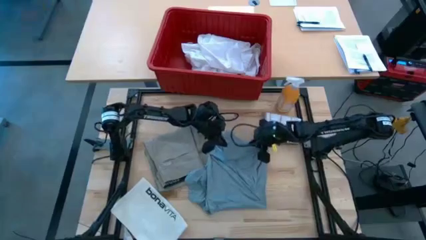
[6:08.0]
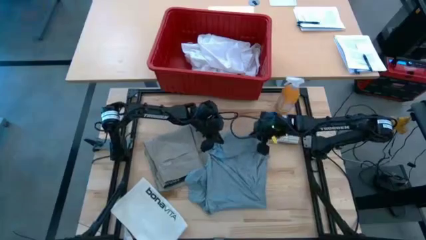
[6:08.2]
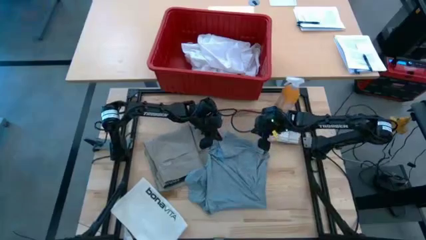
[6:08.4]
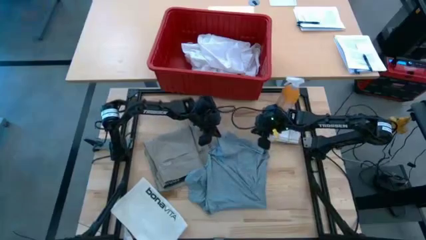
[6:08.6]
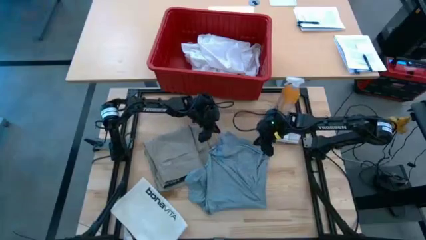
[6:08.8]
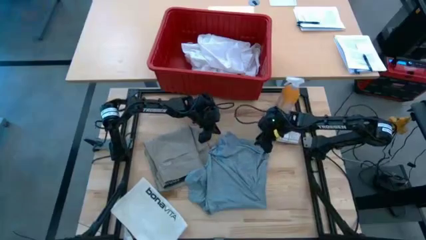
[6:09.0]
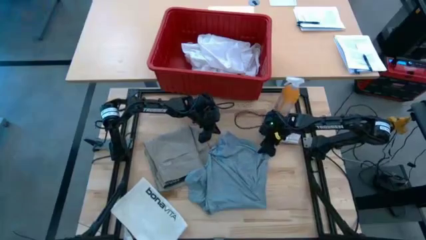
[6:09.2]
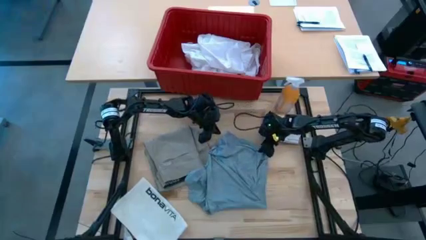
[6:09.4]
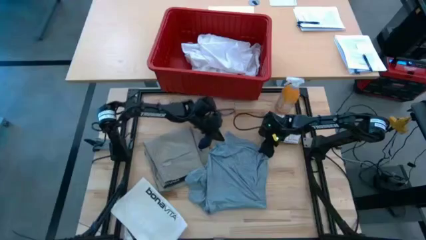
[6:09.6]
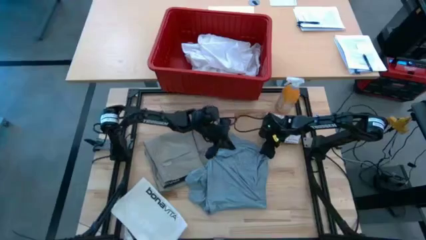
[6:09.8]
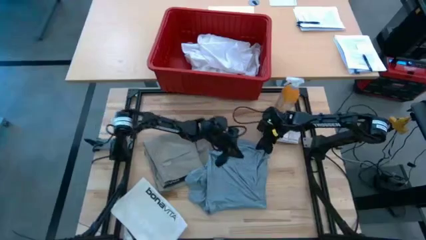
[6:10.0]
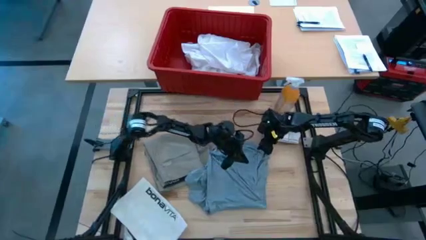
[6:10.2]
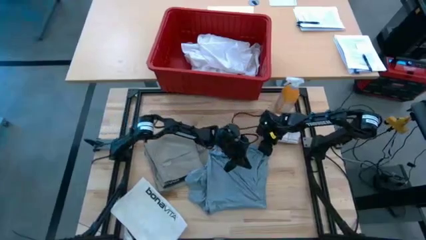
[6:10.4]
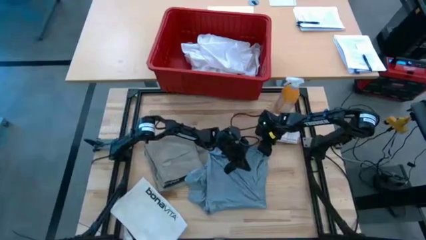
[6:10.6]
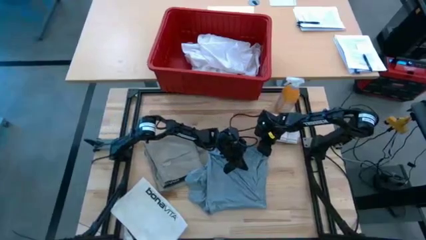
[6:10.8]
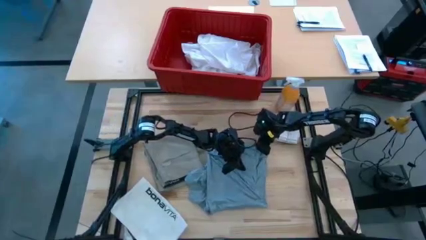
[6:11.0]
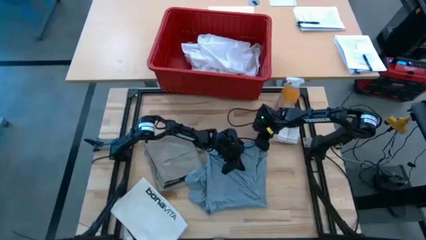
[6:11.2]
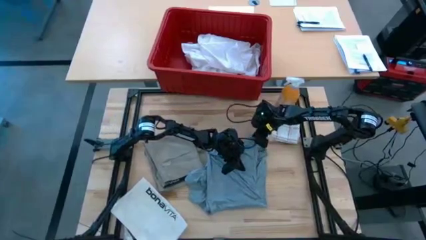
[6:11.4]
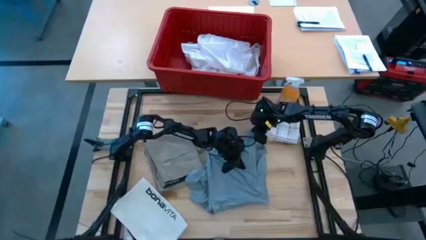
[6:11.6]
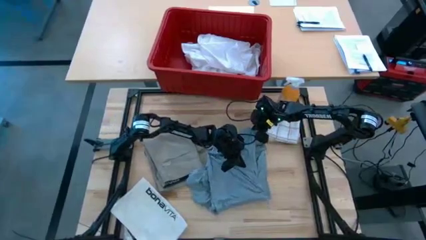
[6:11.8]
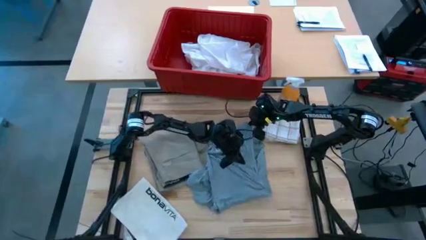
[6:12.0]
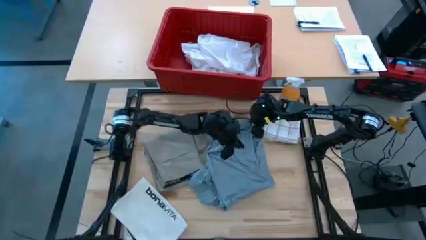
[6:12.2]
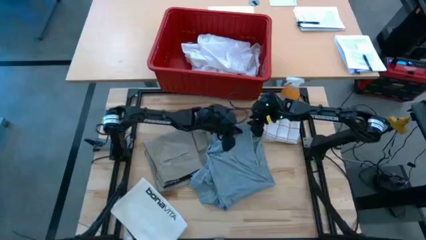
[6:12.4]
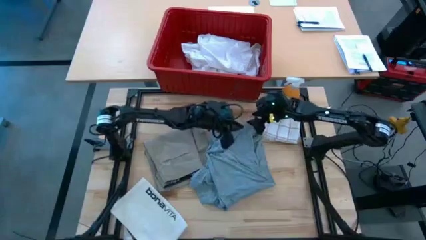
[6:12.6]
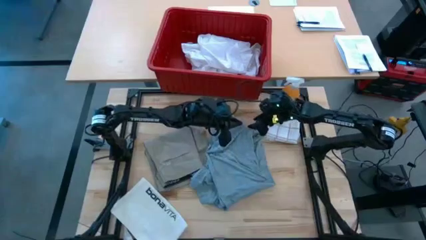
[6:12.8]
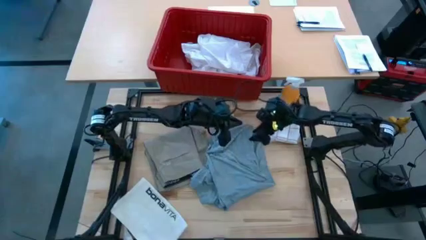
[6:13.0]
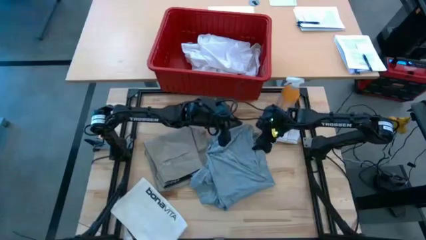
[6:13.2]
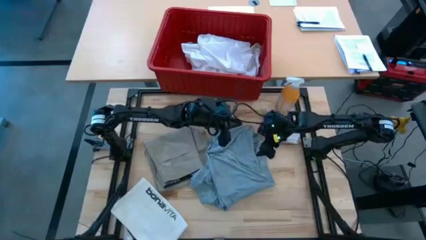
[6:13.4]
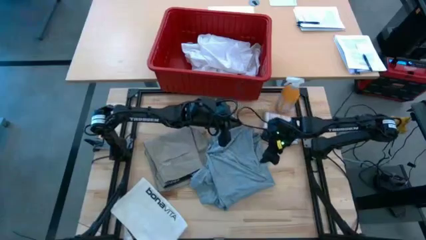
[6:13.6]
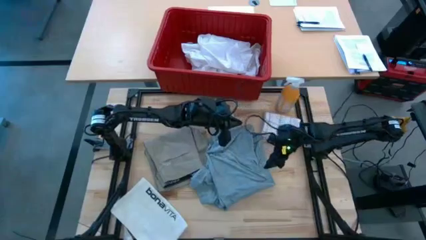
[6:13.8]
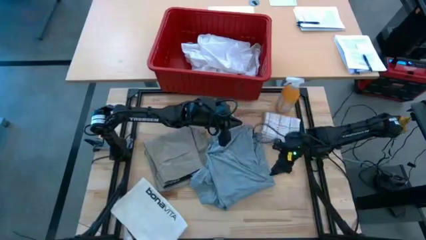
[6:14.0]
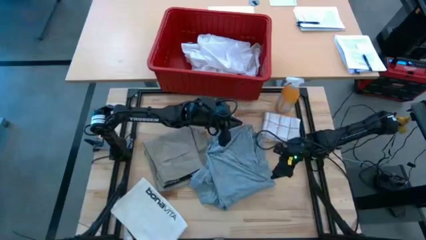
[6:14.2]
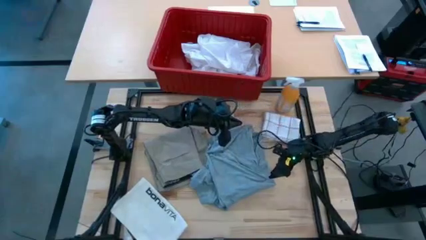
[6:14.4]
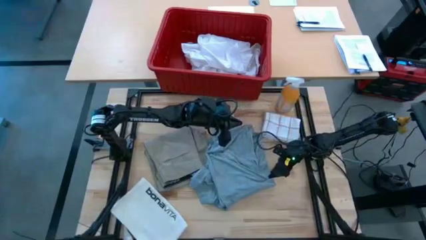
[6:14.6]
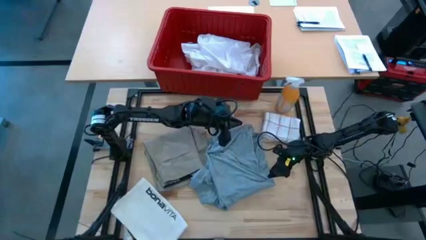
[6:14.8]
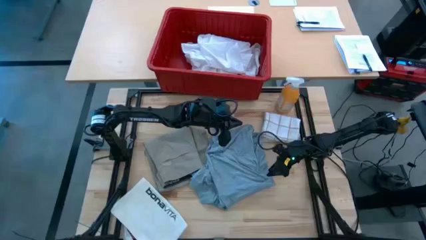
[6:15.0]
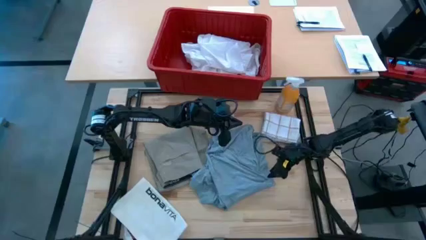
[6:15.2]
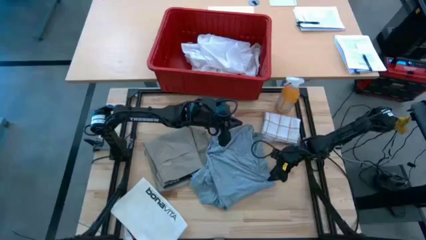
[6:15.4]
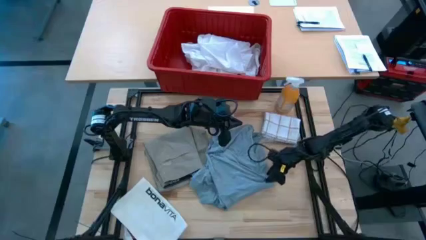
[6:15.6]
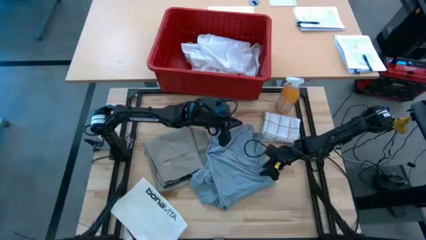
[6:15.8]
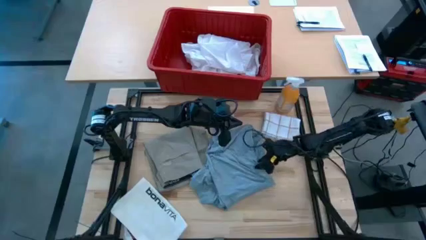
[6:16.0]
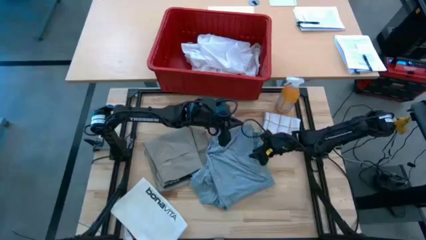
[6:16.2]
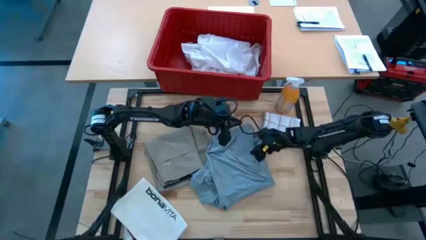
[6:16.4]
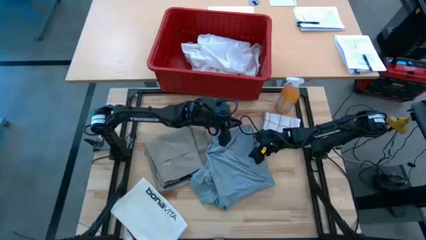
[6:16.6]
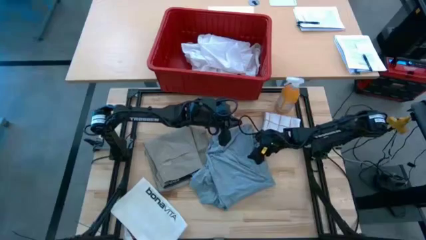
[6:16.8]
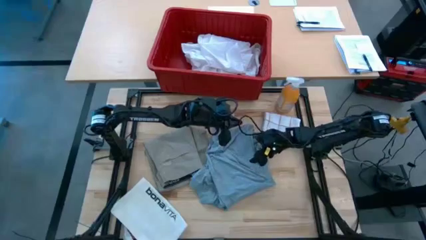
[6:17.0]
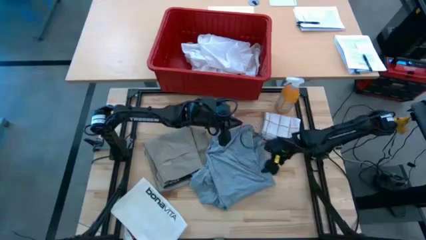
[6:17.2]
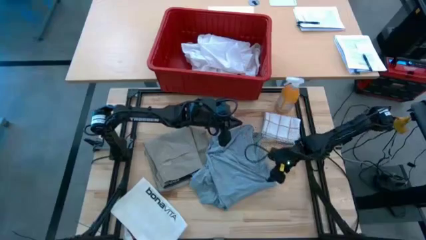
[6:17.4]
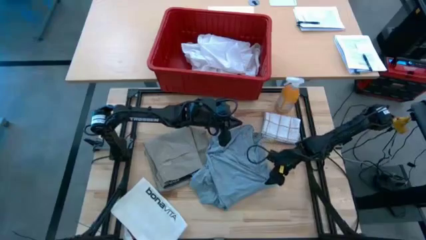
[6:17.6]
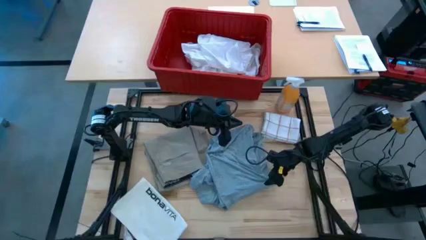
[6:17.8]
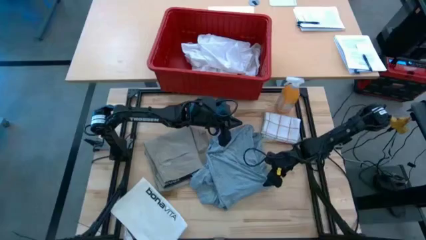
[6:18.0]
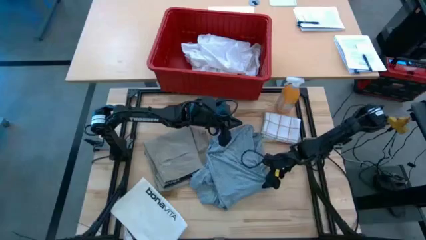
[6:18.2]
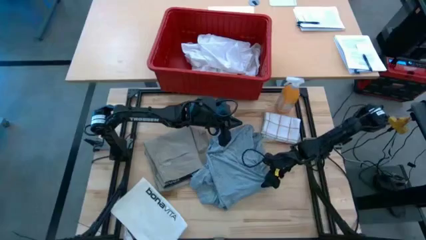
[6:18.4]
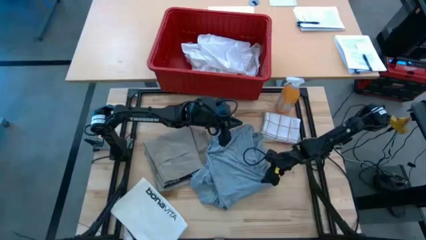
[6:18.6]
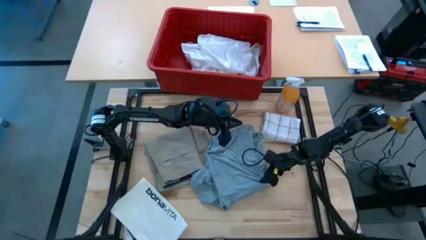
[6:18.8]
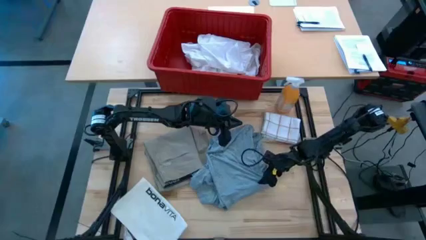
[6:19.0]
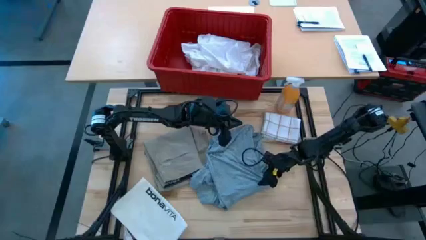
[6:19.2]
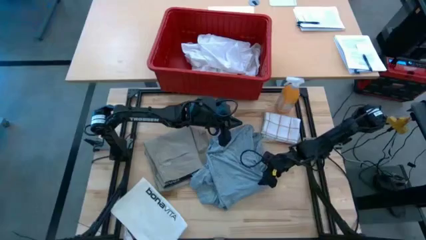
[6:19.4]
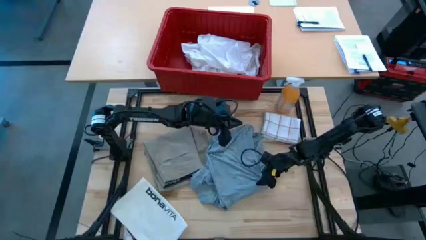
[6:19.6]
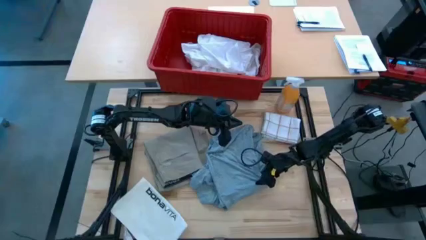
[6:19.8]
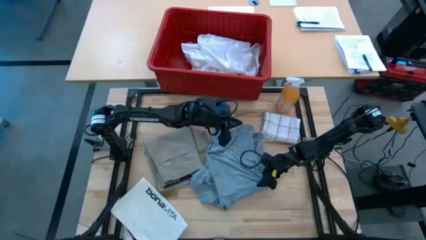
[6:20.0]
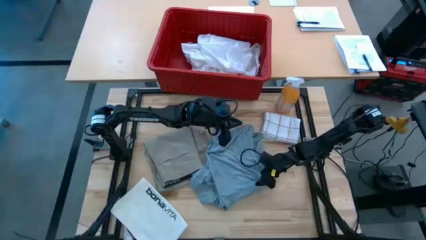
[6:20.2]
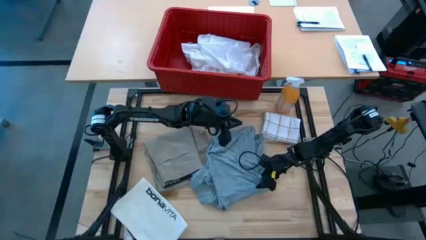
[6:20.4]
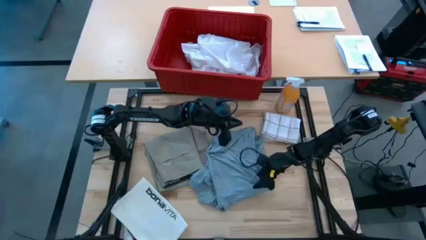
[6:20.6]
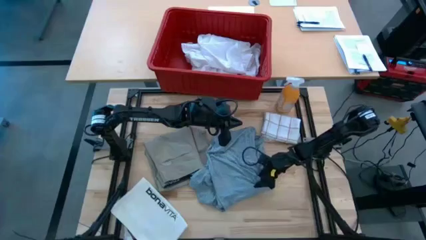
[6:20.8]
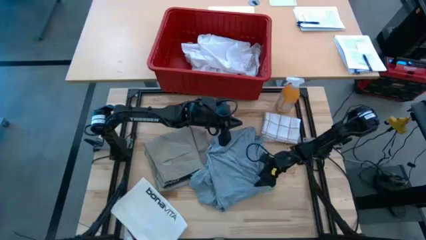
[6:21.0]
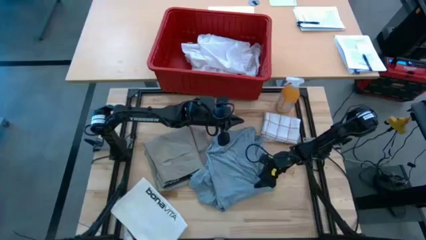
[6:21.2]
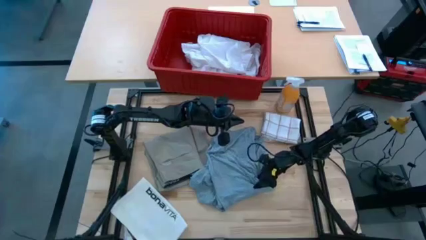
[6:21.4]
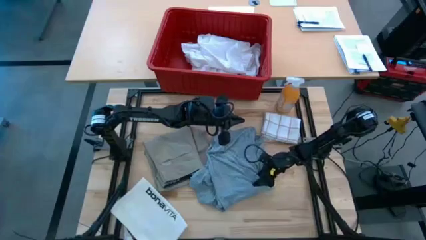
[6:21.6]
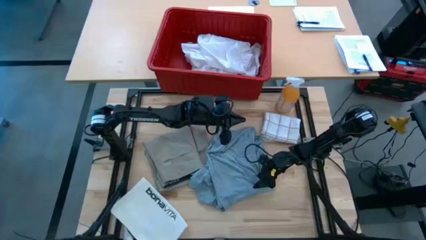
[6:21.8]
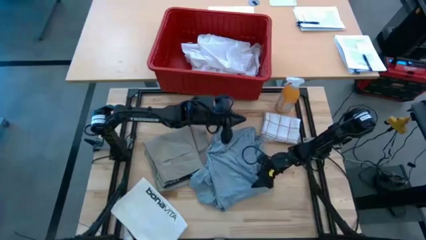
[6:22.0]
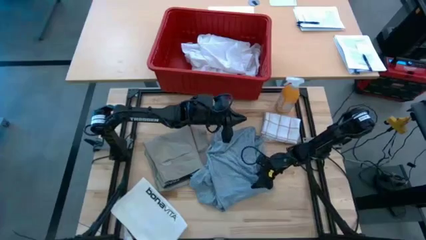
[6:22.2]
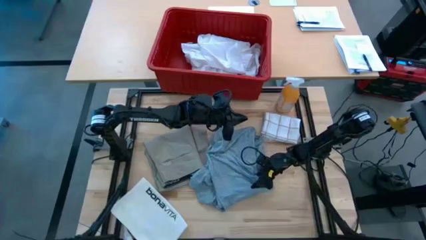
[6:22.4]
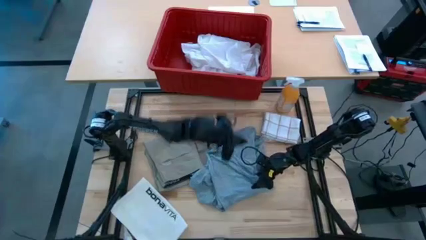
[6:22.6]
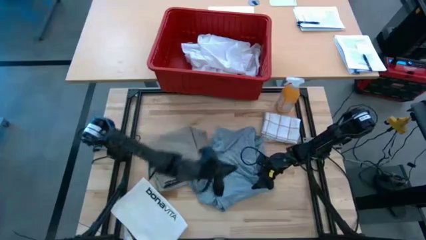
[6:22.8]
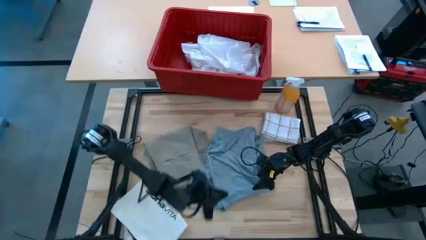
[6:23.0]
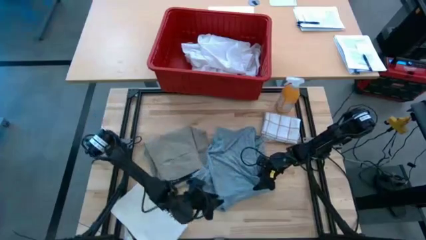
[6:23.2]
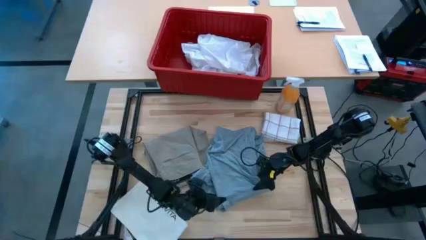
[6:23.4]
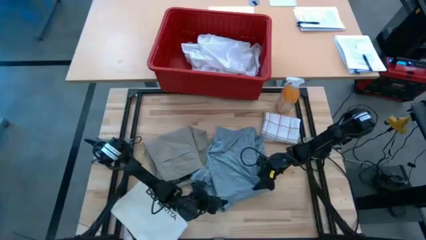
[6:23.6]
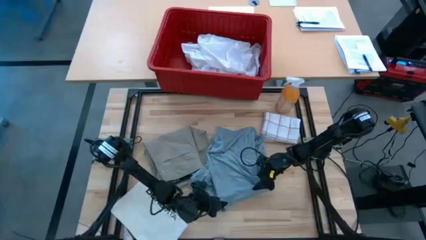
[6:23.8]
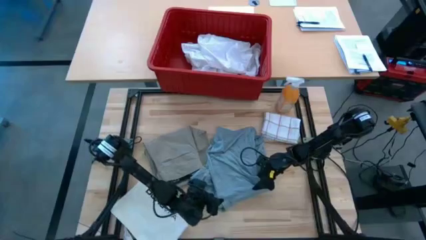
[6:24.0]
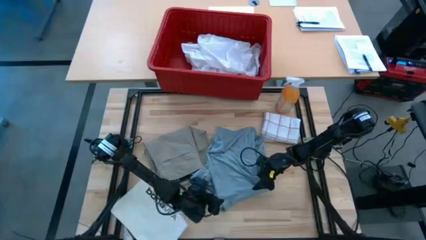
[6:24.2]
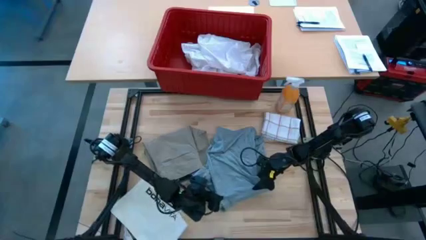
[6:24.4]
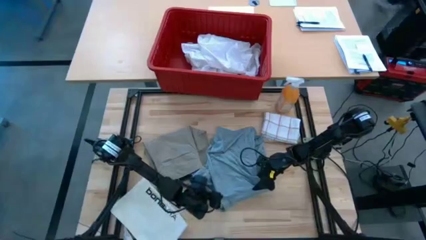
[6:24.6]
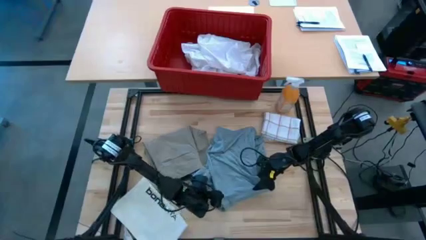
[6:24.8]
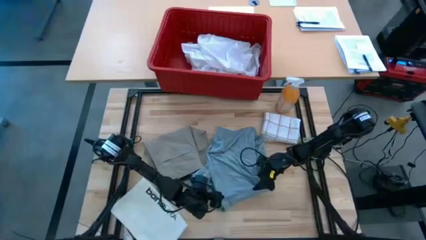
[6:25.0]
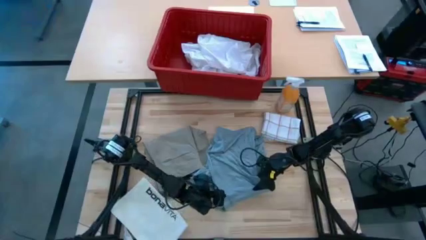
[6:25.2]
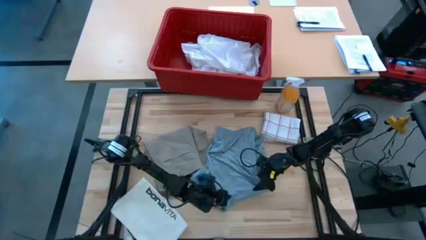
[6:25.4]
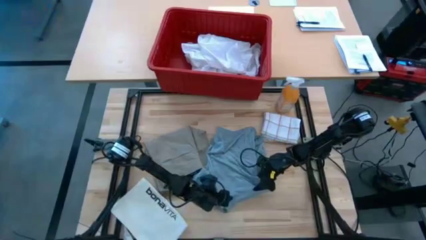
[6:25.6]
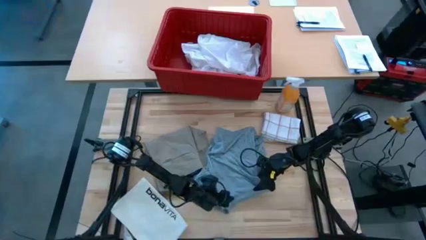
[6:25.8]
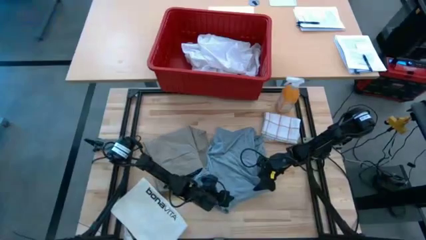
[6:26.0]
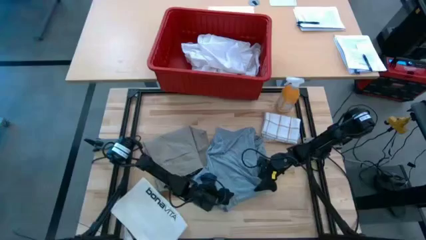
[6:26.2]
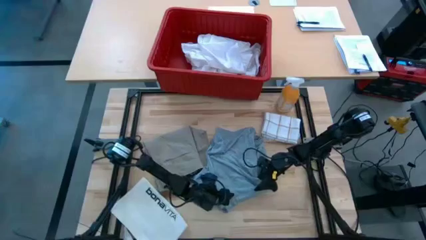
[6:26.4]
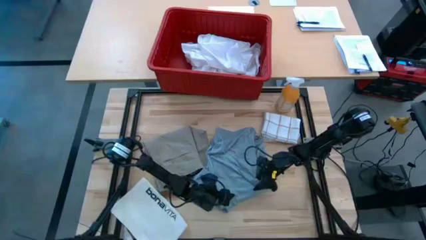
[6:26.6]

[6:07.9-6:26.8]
Task: Fold laundry
Fold the gray shirt
